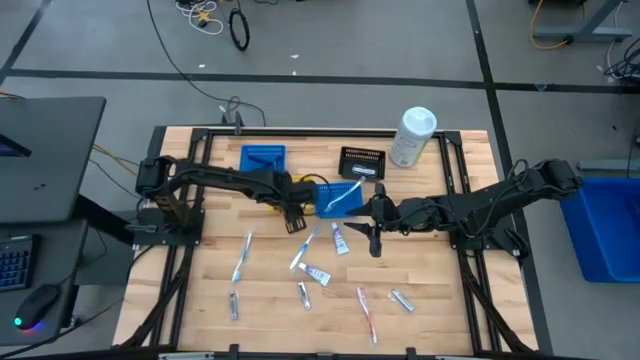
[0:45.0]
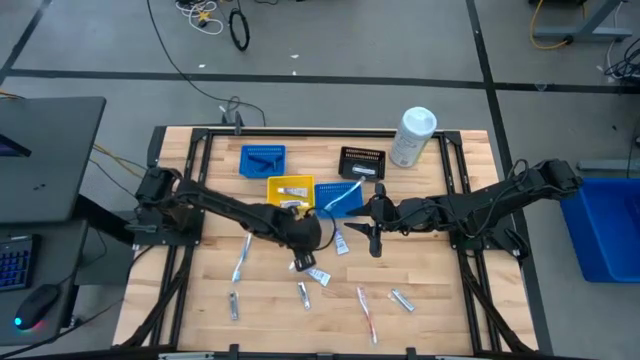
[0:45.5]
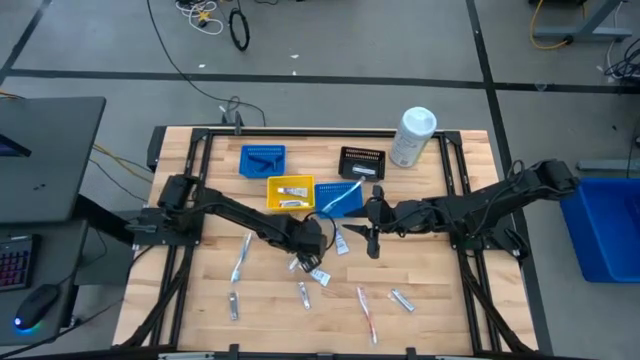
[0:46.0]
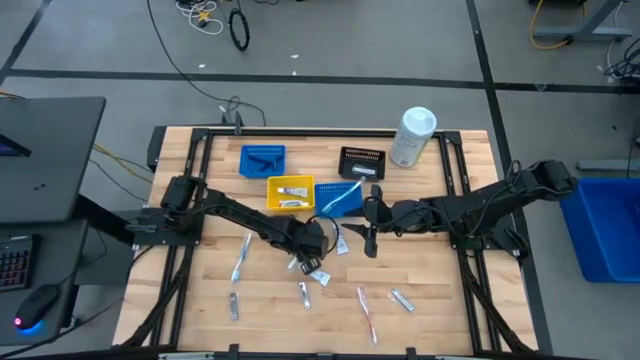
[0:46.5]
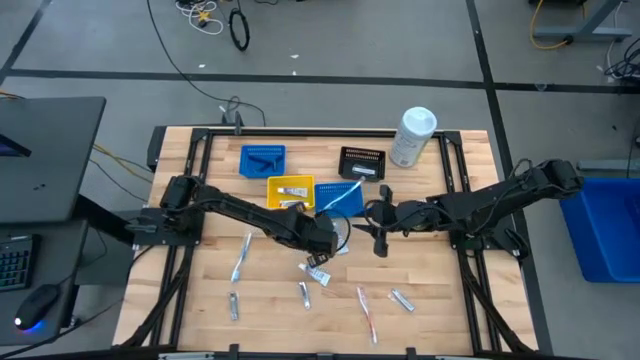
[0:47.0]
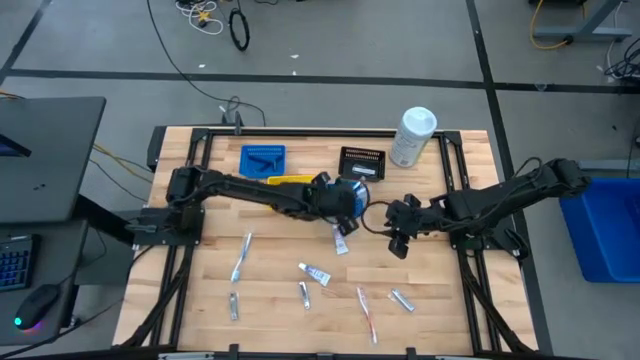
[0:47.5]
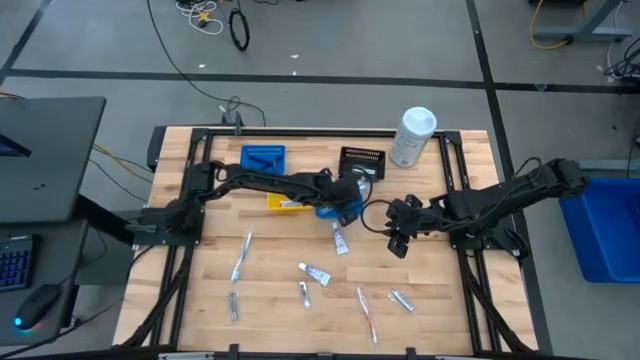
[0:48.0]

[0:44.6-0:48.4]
Task: Pick & Place Travel size toiletries
Put the blue toothbrush into the right blue basket

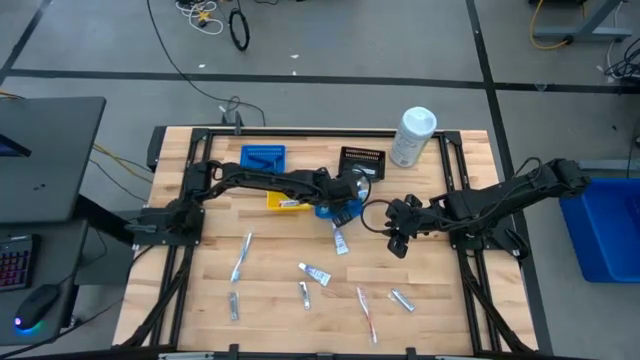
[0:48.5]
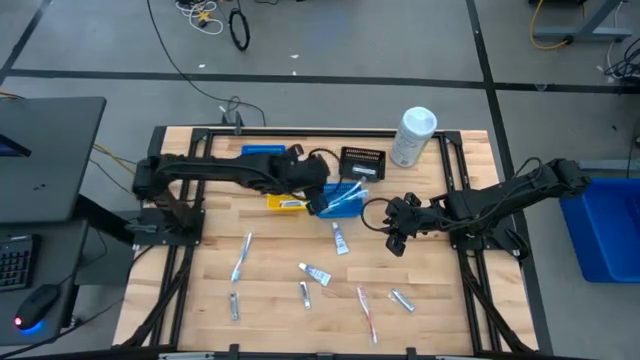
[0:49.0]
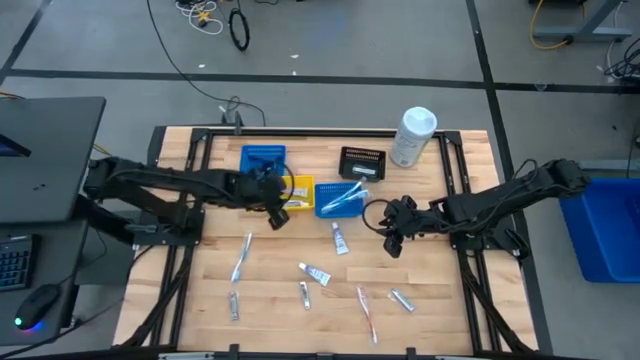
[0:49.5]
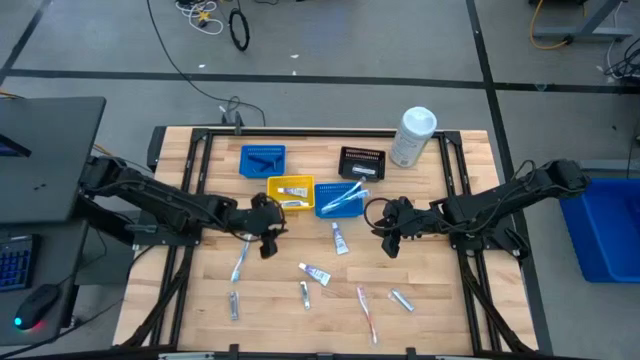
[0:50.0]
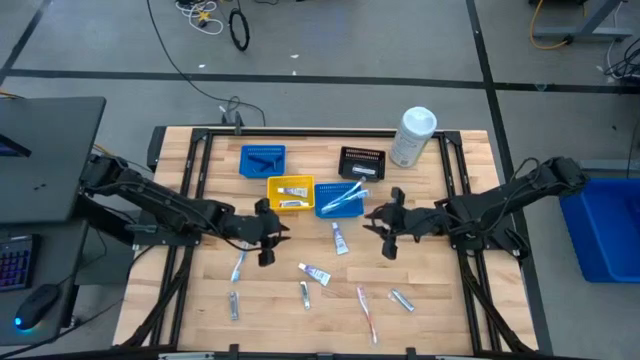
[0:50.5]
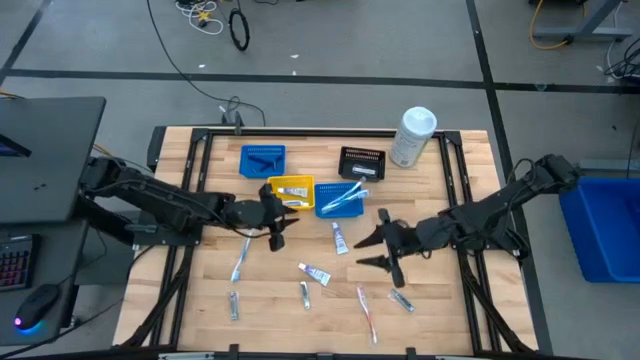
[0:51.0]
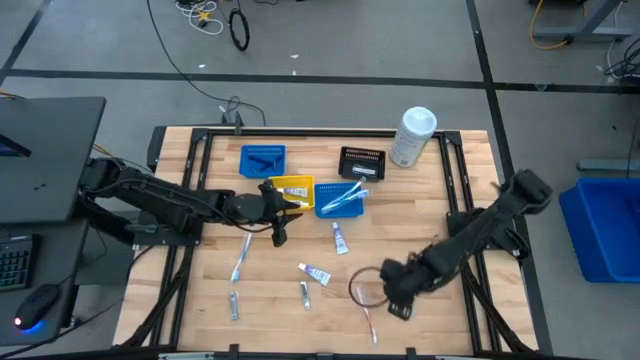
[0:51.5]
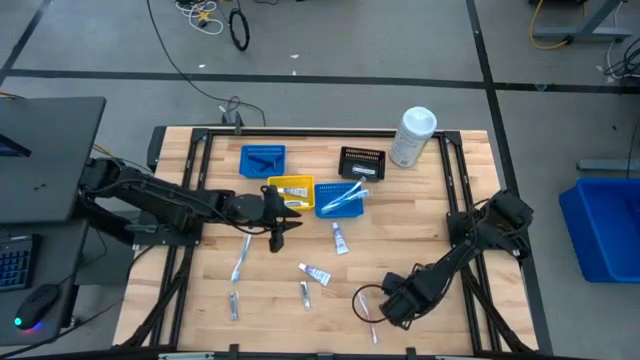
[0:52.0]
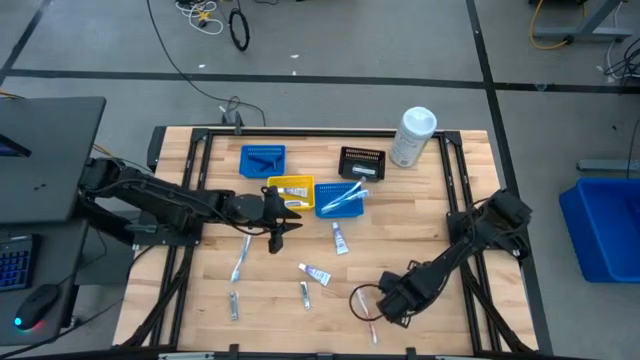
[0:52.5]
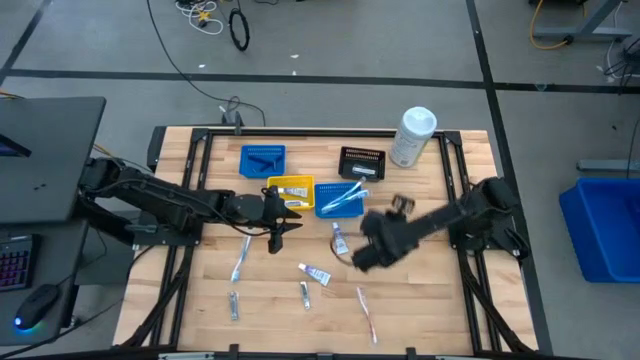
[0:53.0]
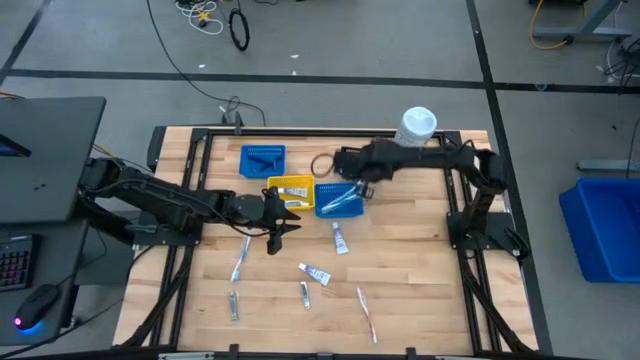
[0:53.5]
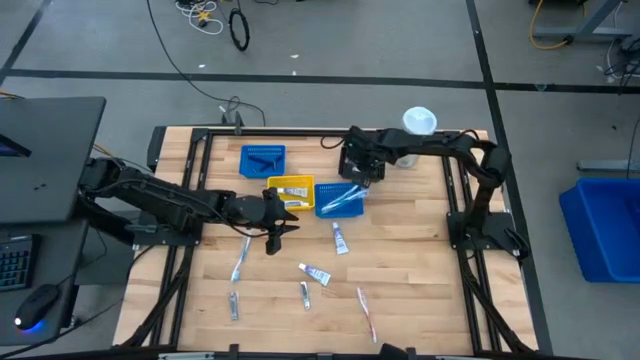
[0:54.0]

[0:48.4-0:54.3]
Put the nail cutter into the black basket

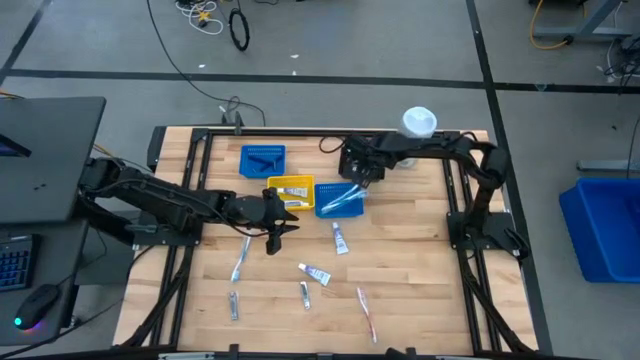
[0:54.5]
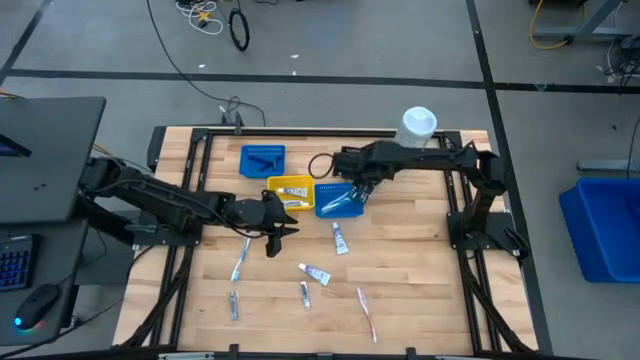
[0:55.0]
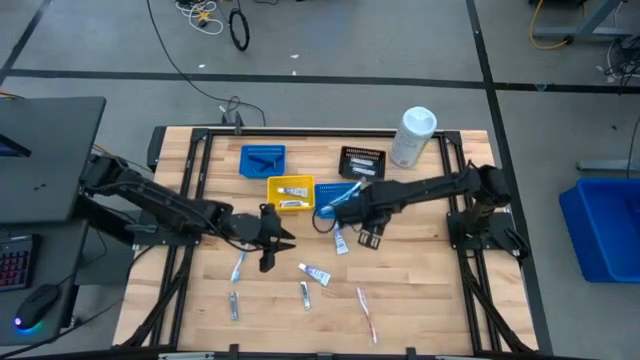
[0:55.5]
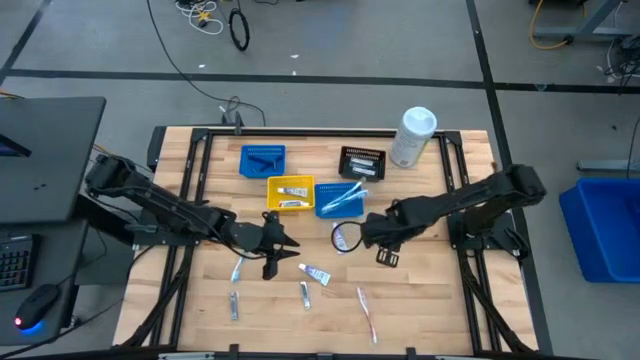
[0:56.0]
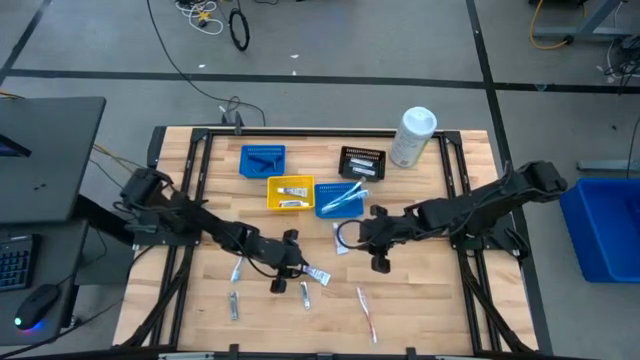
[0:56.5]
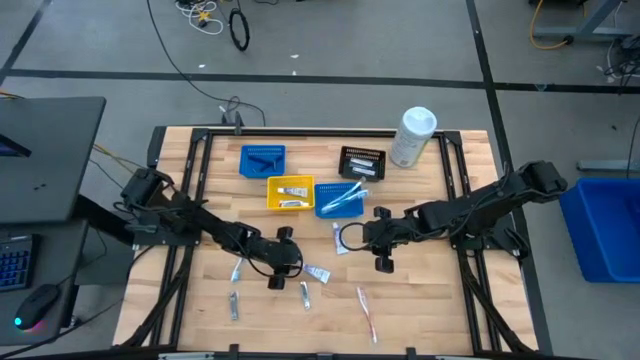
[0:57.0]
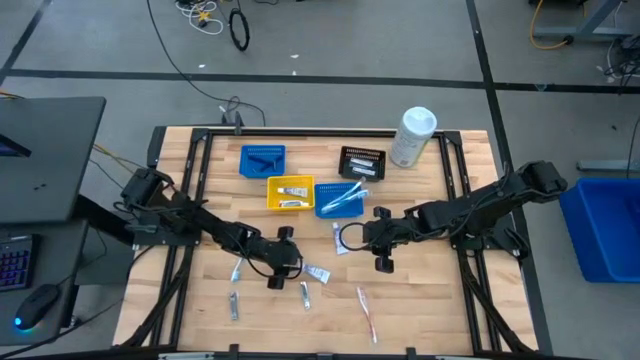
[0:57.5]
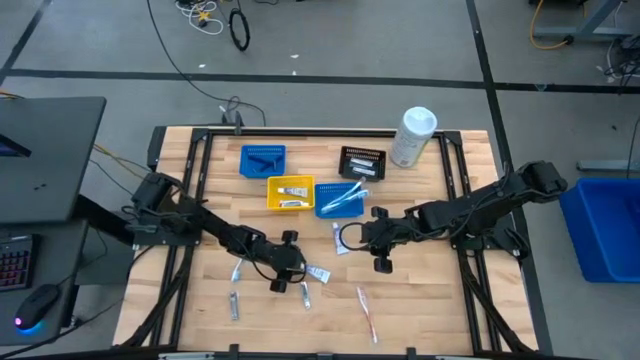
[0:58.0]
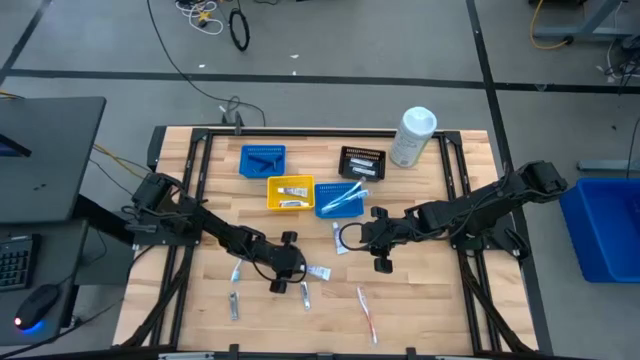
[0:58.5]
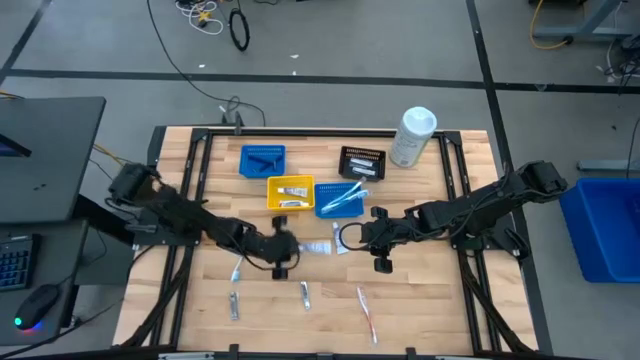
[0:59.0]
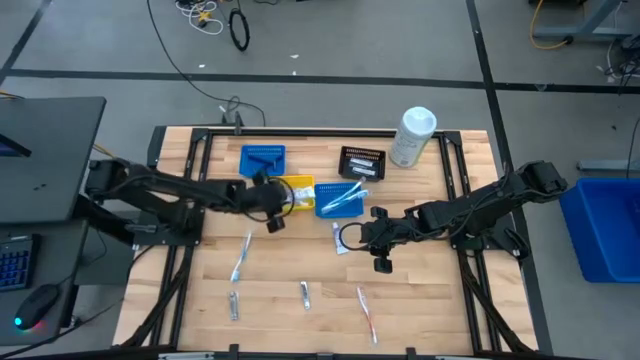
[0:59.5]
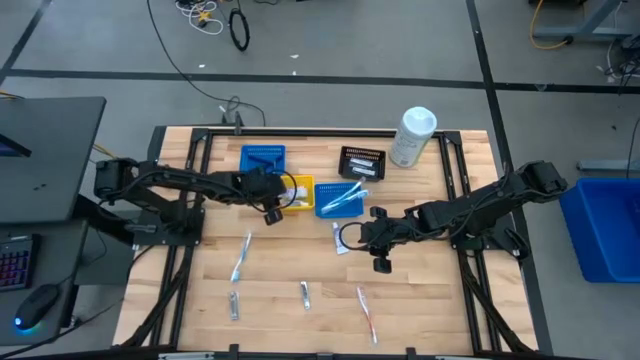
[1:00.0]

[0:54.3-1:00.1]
Put the toothpaste into the yellow basket

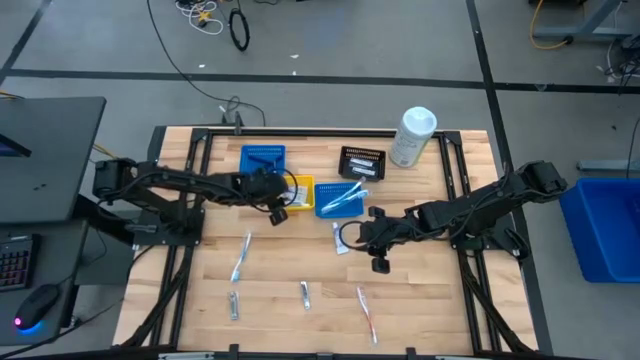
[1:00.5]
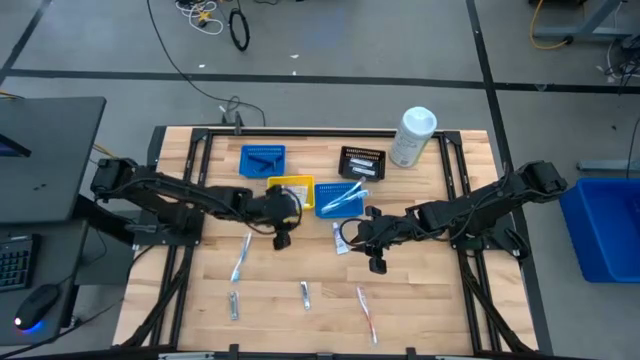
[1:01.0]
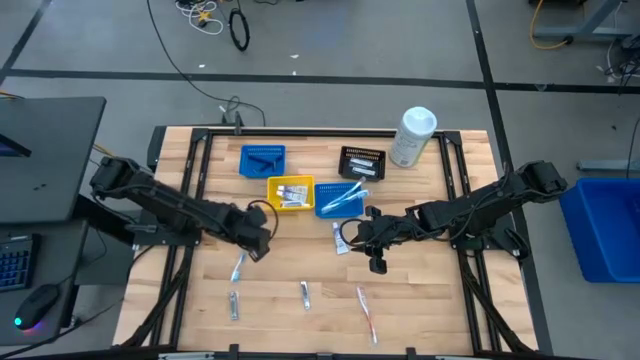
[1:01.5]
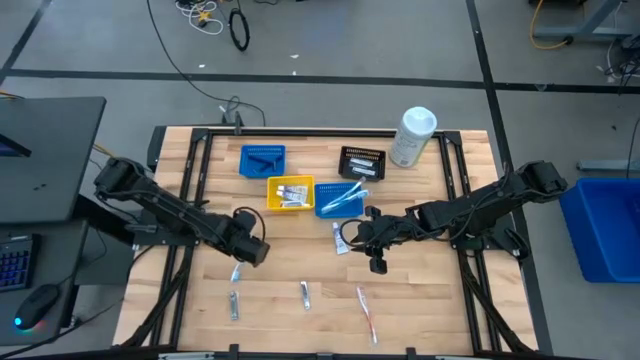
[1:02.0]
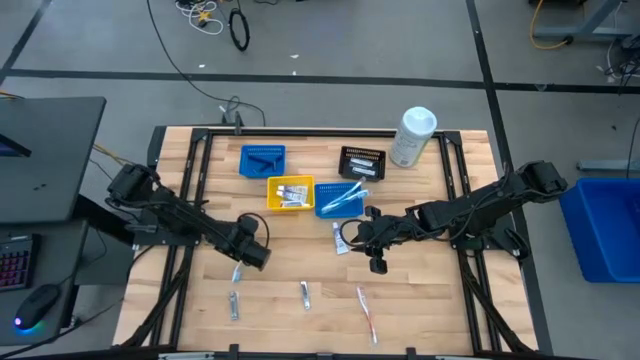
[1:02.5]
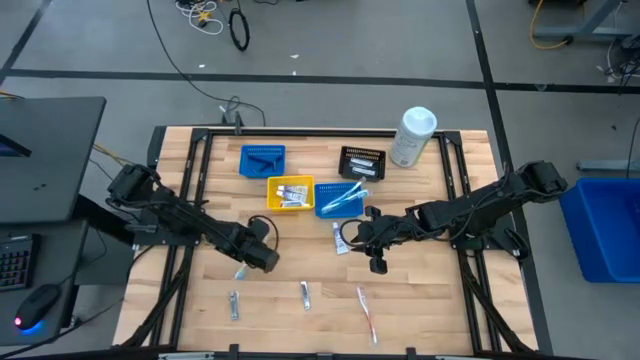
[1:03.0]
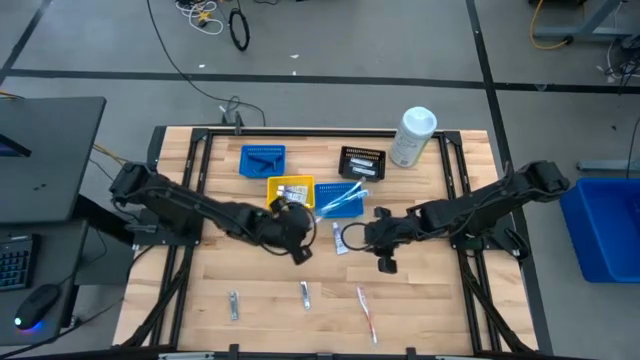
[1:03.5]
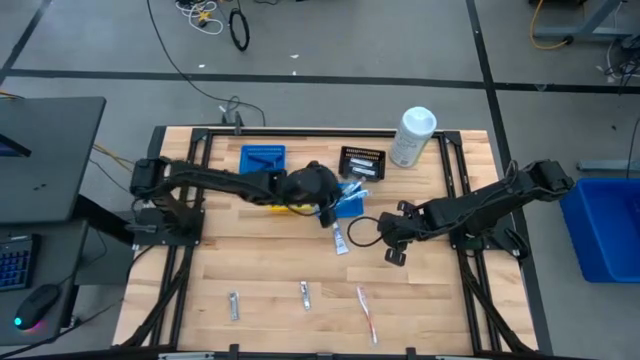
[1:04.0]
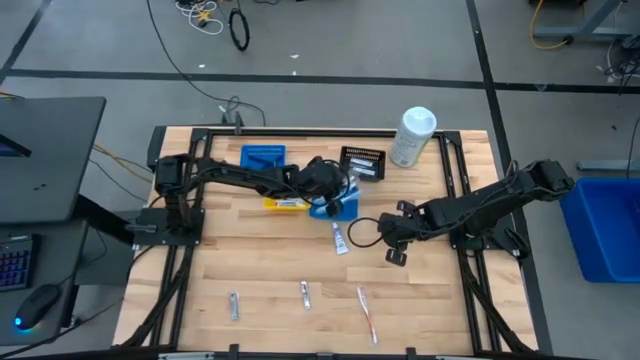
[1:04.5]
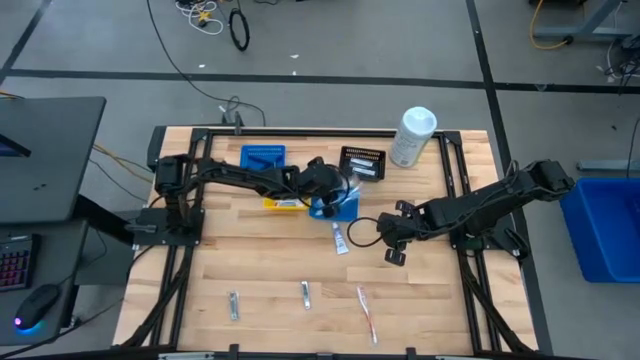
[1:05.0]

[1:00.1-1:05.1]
Put the blue toothbrush into the right blue basket
